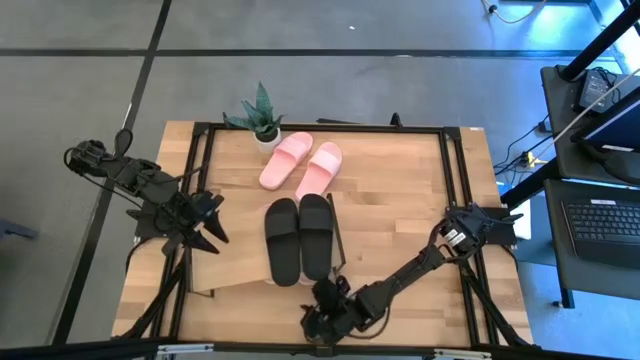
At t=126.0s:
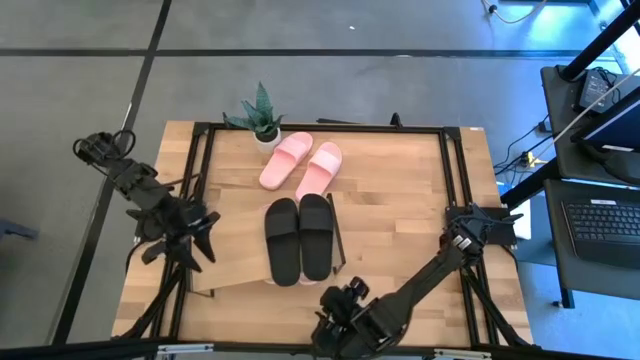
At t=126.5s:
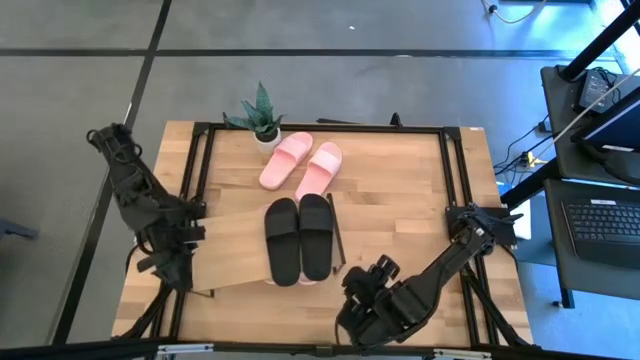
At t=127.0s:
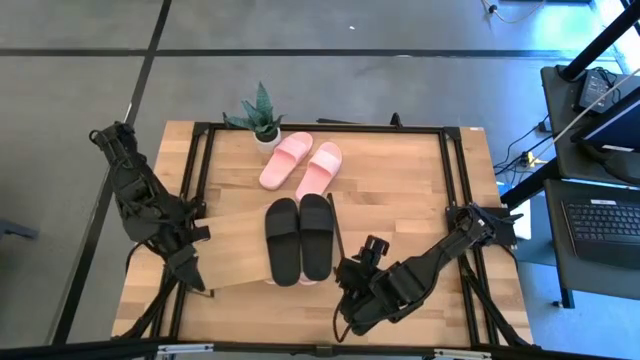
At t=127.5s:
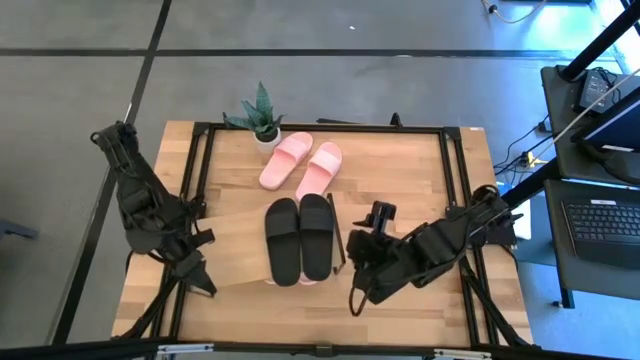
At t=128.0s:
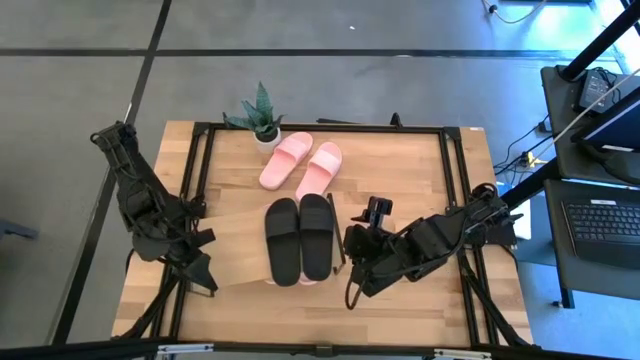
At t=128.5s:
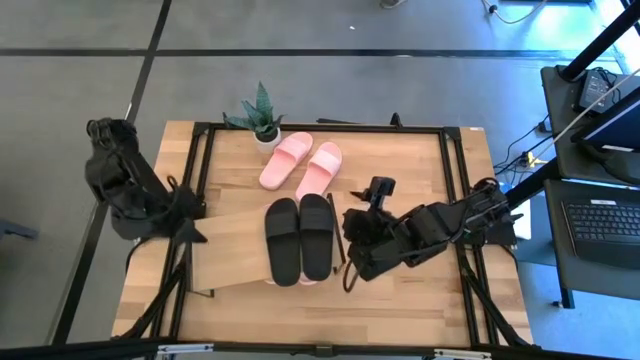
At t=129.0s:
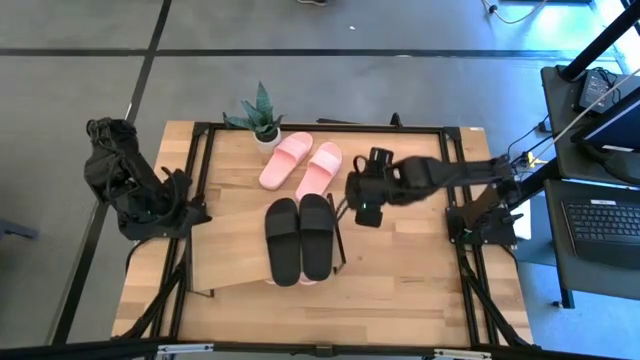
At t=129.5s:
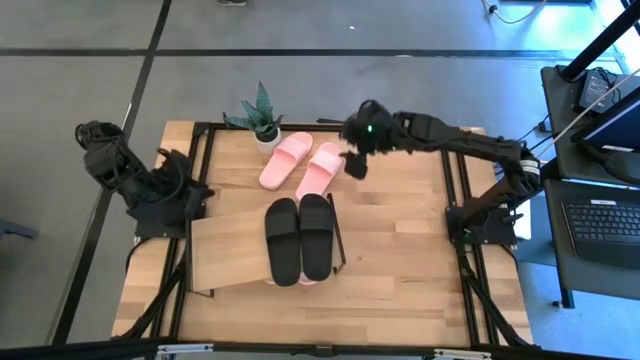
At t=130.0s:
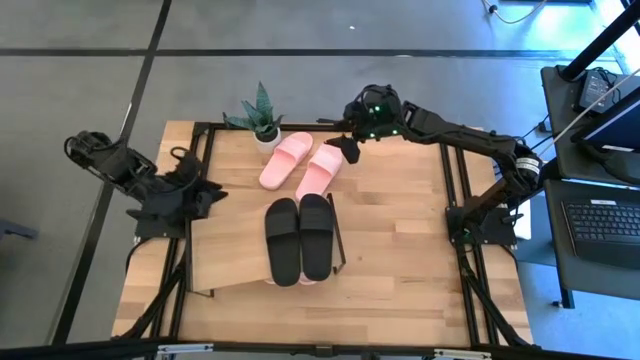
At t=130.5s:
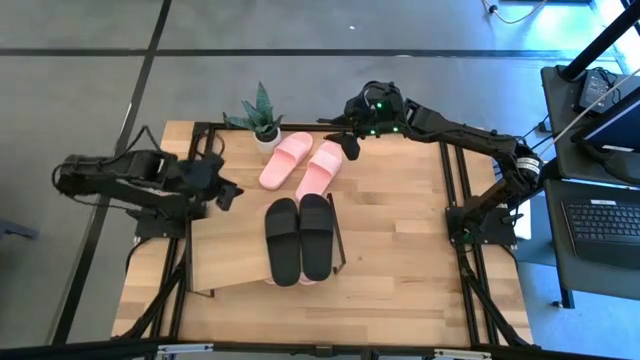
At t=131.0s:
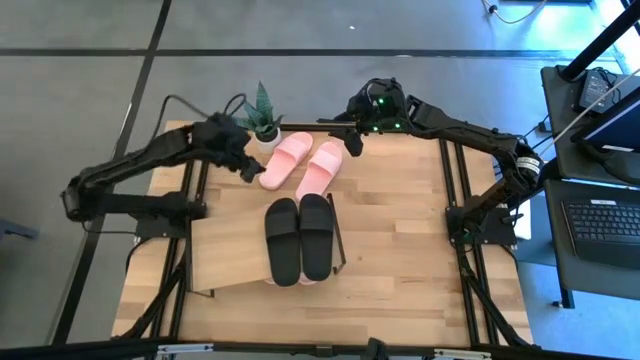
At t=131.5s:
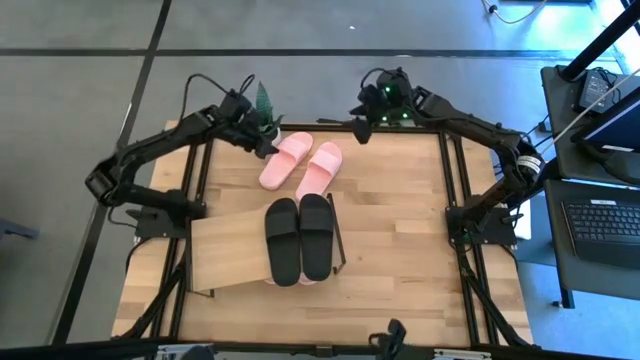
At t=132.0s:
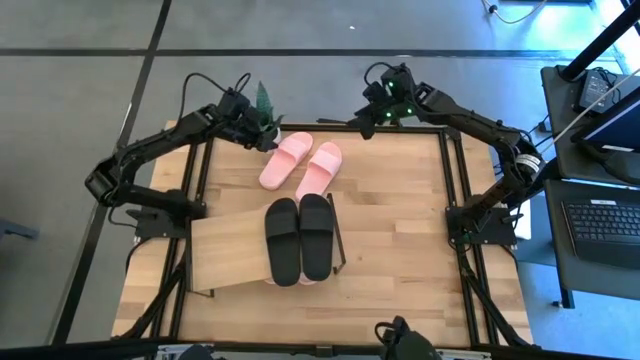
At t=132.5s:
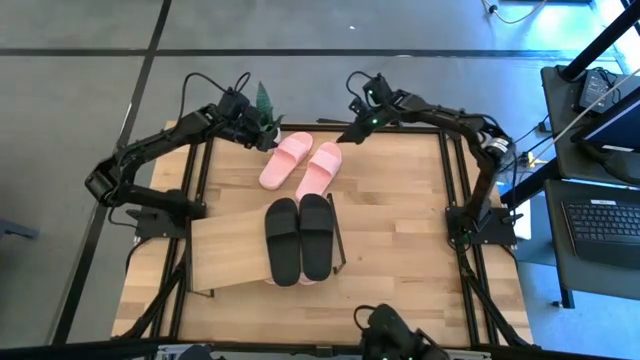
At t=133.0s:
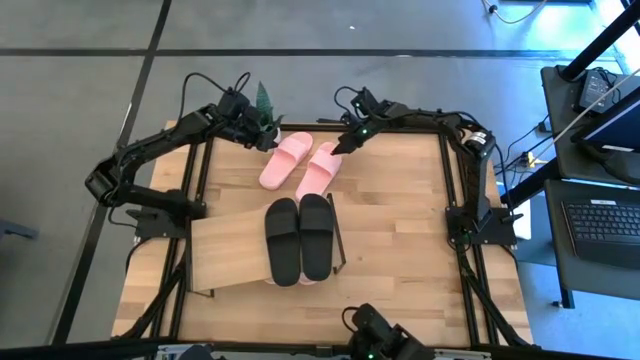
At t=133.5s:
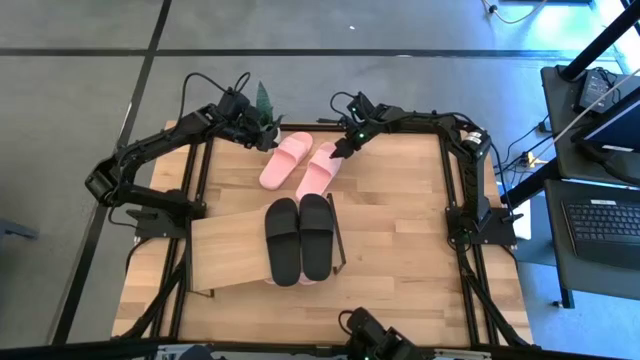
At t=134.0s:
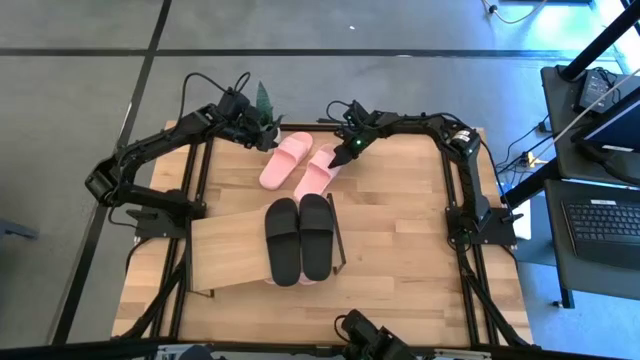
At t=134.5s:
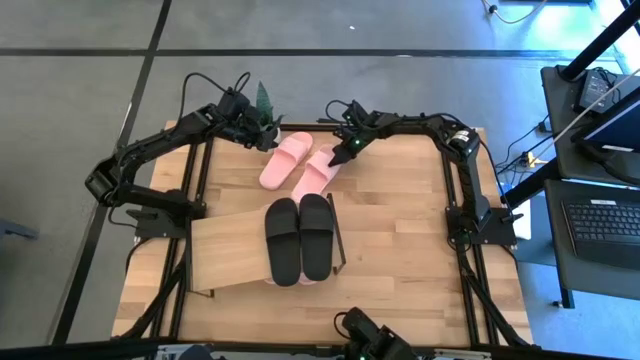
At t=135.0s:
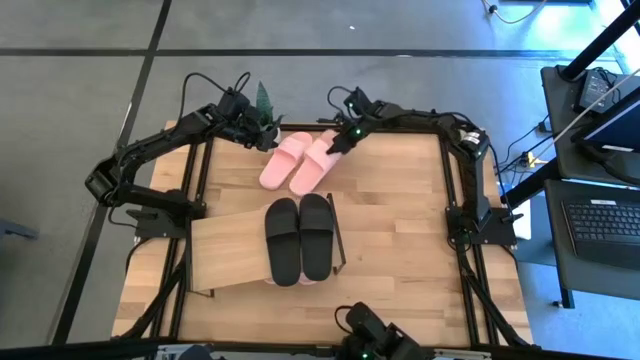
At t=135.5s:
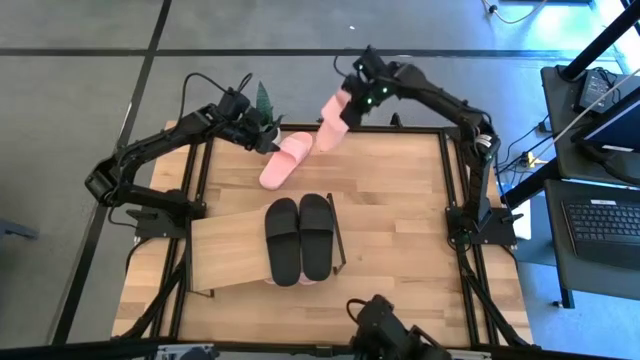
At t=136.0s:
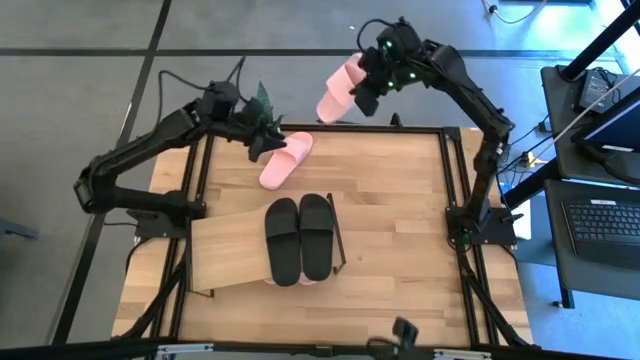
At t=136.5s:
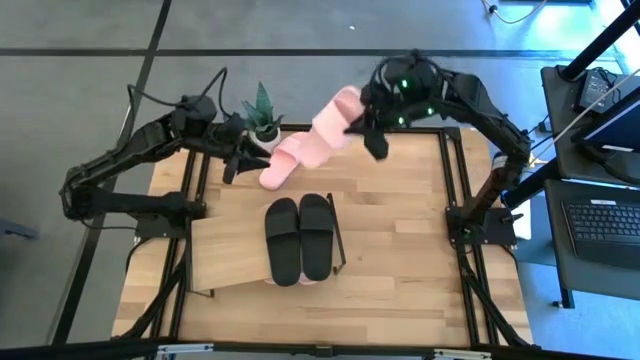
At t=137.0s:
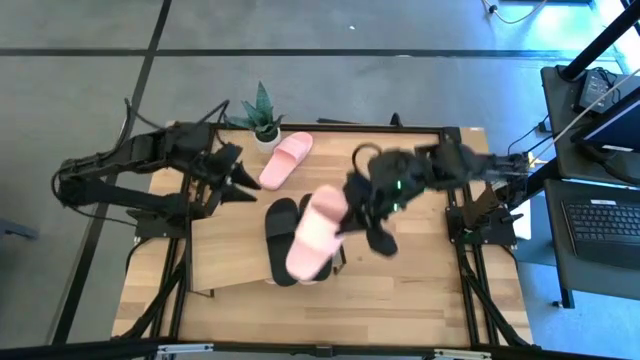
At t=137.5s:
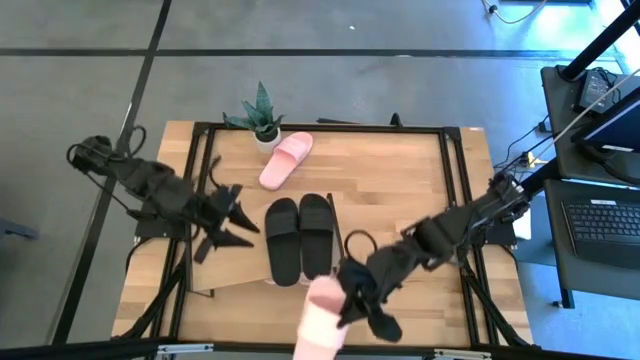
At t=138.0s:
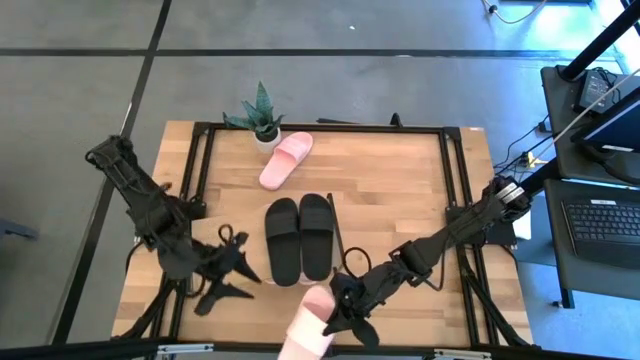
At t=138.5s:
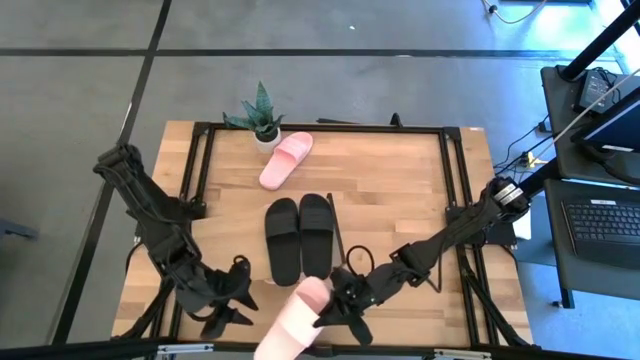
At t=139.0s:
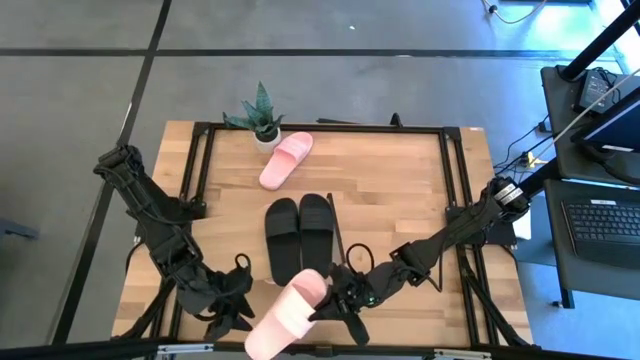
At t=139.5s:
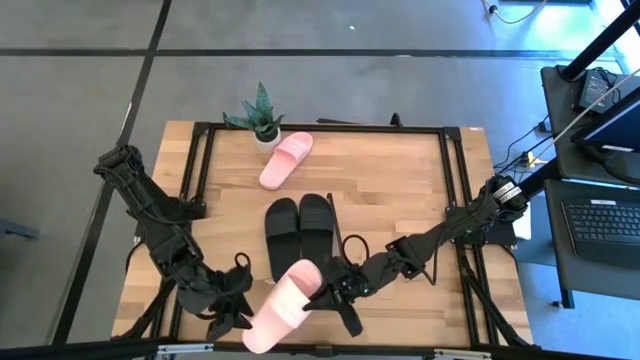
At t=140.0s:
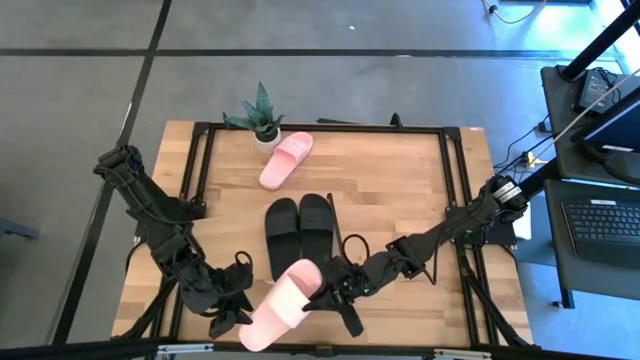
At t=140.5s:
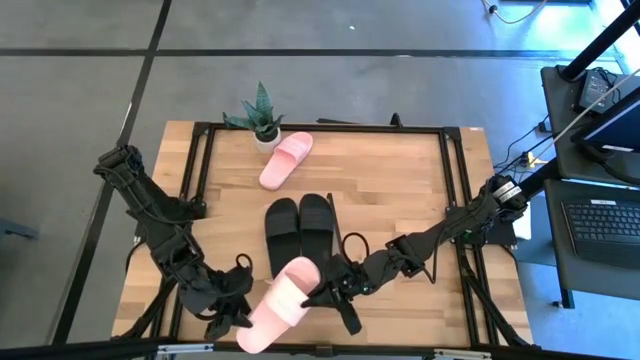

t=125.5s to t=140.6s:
Task: Pick and place slides into the shelf
Put the pink slide under the shelf

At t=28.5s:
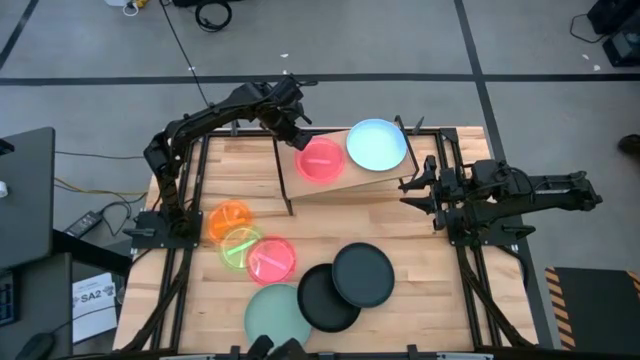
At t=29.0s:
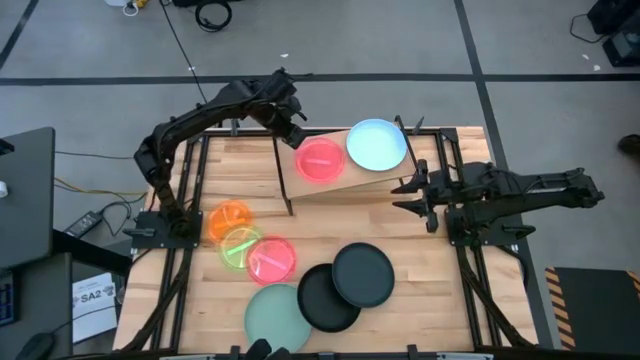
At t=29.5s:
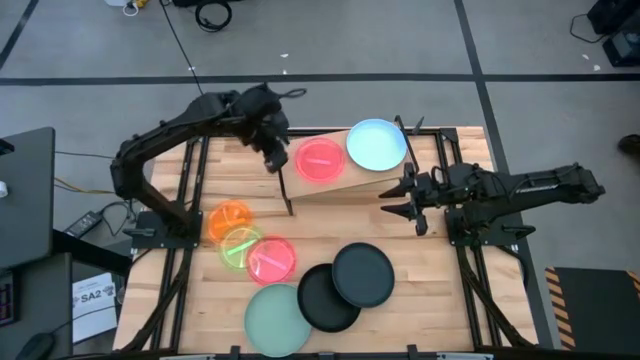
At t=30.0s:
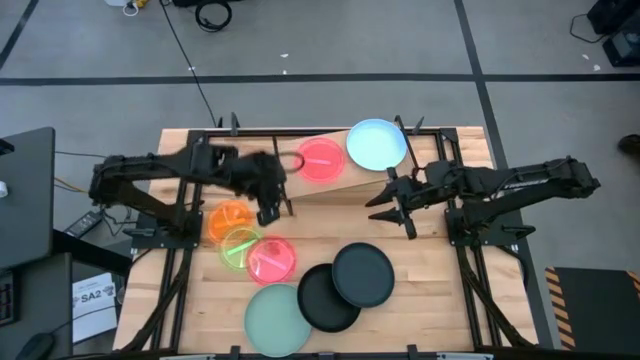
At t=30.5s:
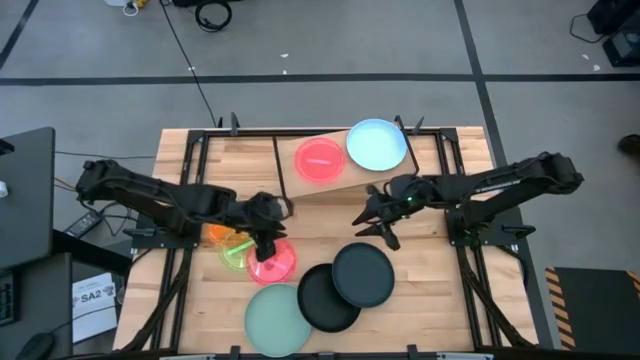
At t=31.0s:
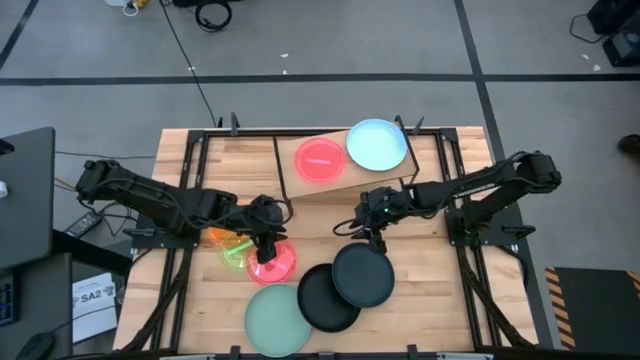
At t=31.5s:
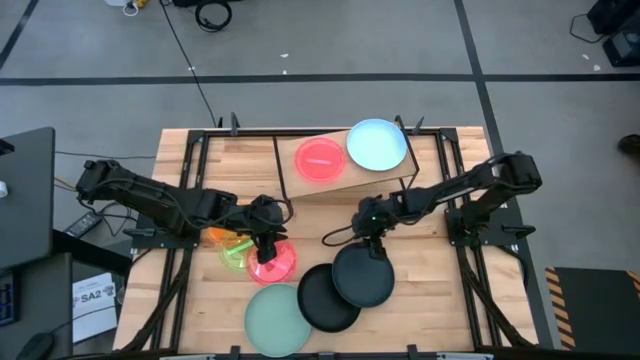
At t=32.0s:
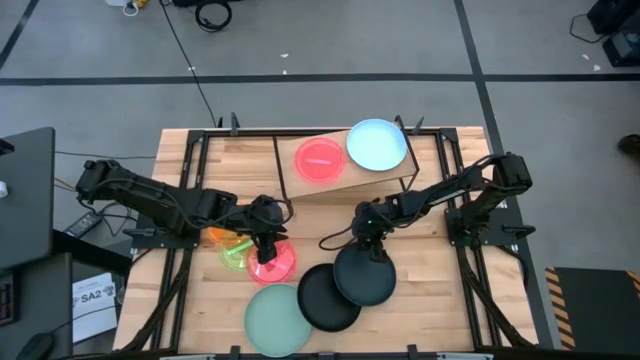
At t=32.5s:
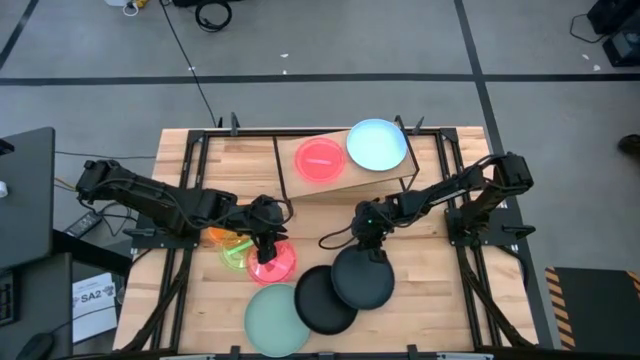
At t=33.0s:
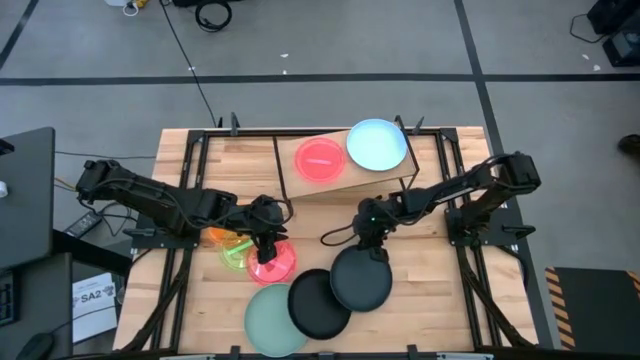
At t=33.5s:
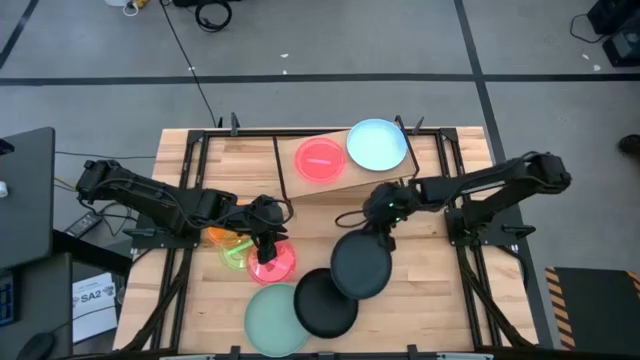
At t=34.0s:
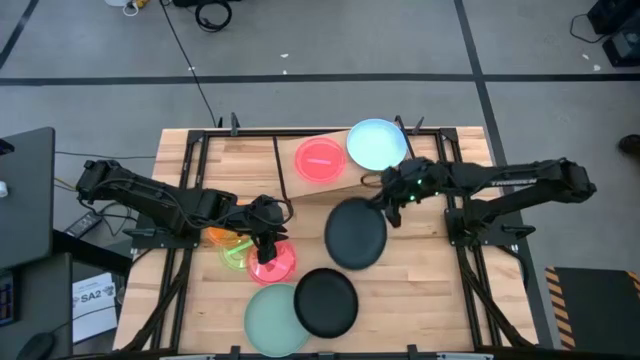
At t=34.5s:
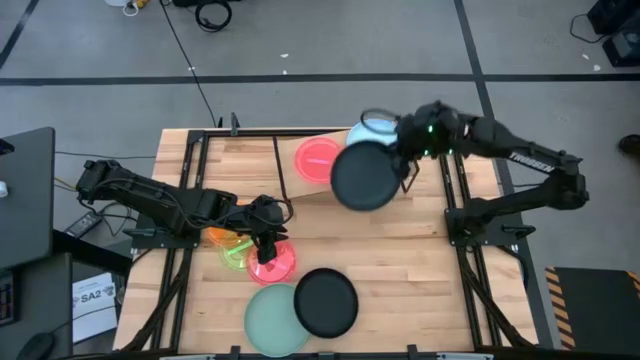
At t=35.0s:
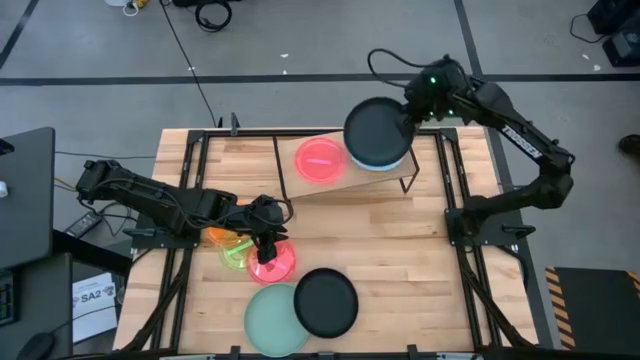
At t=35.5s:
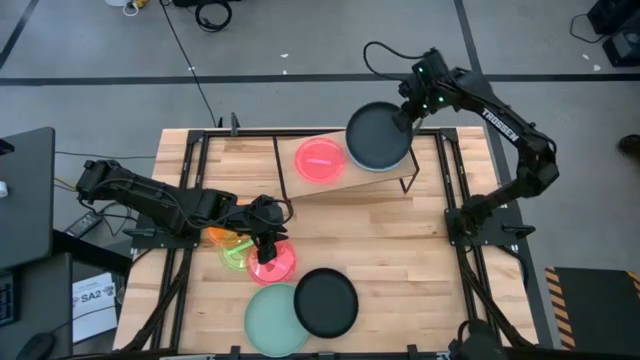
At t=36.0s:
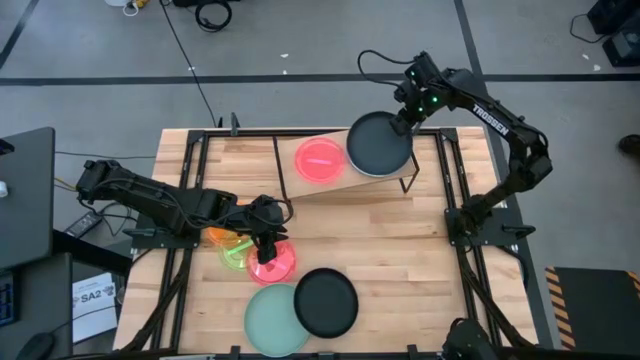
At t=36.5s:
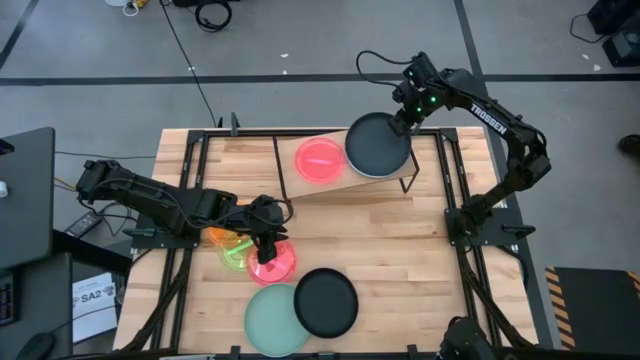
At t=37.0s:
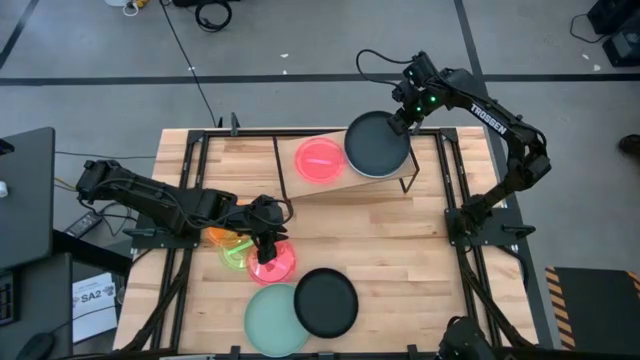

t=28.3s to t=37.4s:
Task: Place and stack plates onto a shelf
Stack the right large black plate on top of the large blue plate on the shelf
